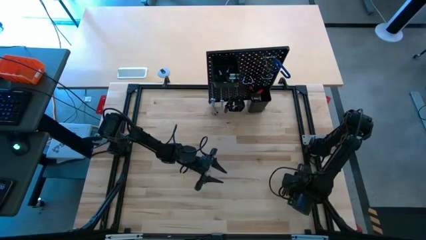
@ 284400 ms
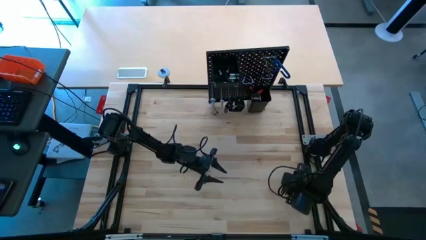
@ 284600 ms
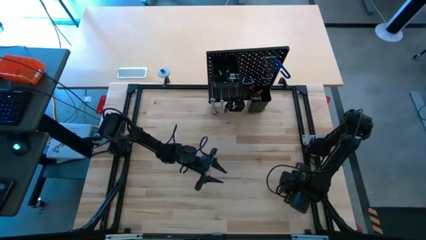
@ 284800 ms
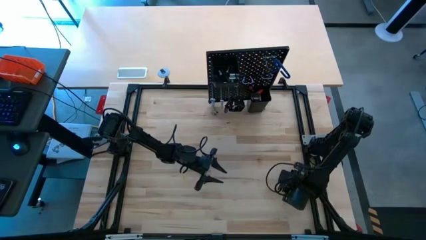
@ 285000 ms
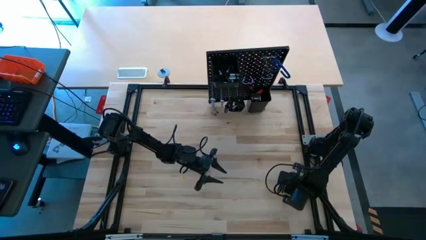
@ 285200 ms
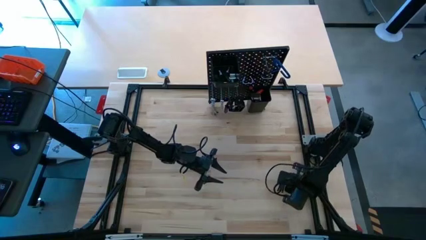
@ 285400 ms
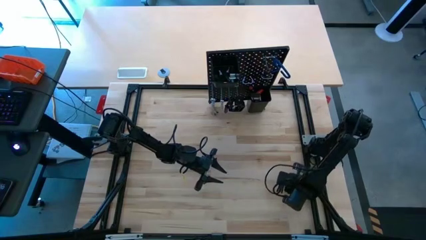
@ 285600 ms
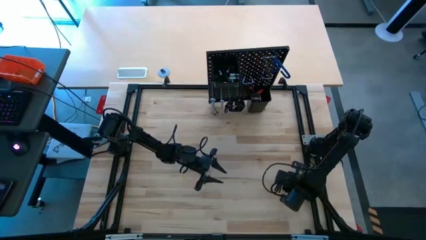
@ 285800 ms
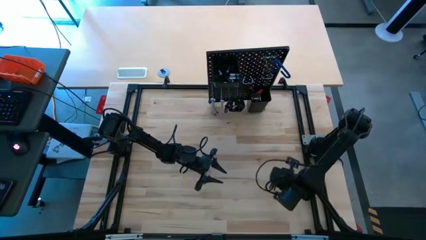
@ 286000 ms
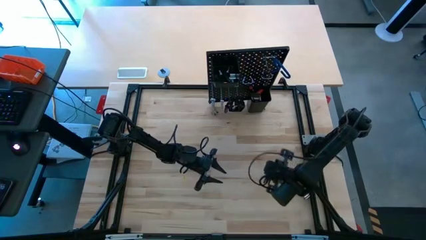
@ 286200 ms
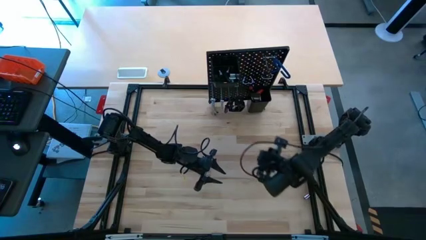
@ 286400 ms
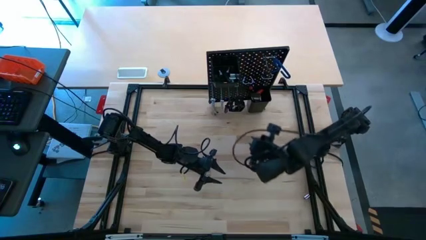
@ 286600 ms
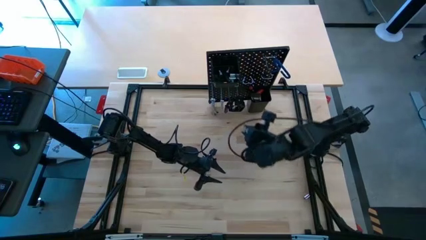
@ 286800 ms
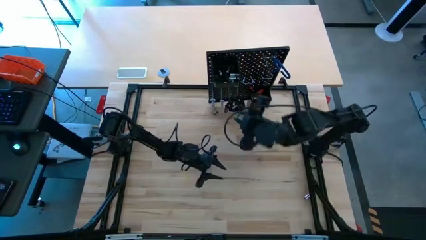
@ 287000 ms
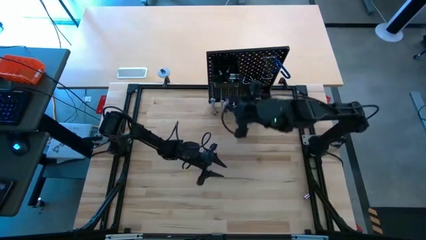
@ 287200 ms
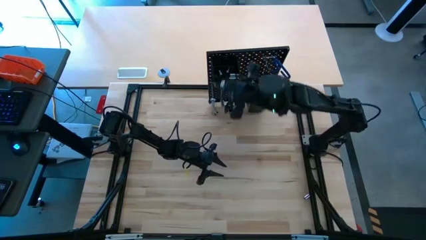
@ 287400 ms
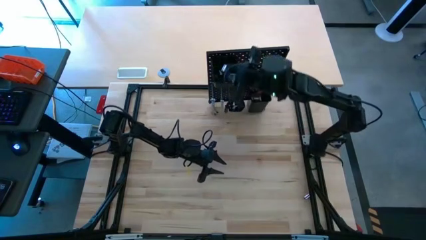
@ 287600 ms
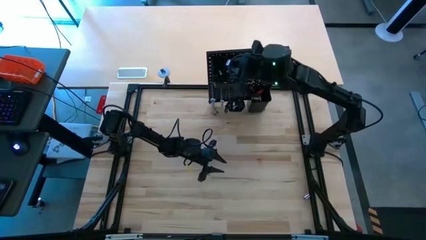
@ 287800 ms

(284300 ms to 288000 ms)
Task: Hang tools onto peg board
Put the silver socket into the top black bin on the peg board

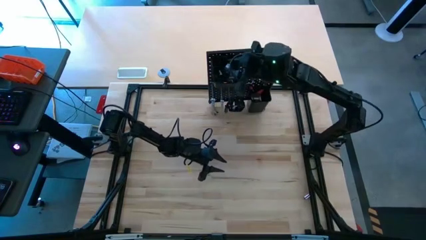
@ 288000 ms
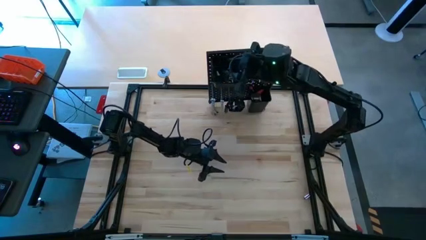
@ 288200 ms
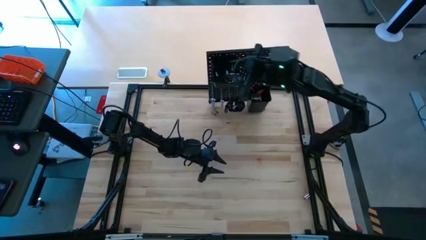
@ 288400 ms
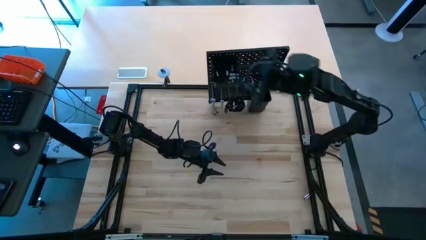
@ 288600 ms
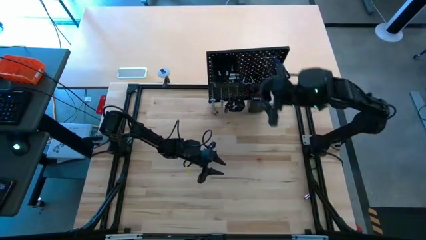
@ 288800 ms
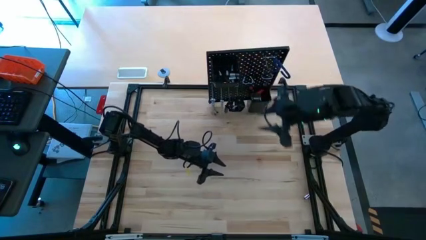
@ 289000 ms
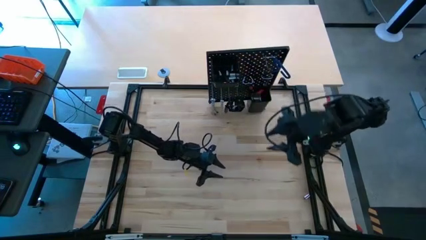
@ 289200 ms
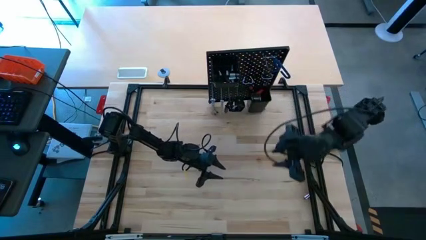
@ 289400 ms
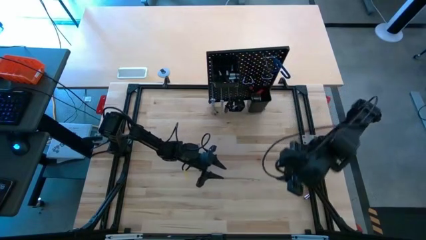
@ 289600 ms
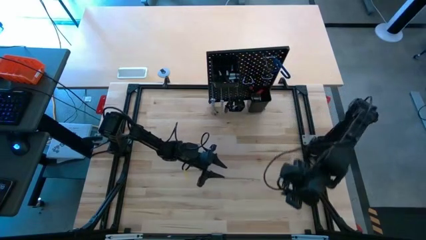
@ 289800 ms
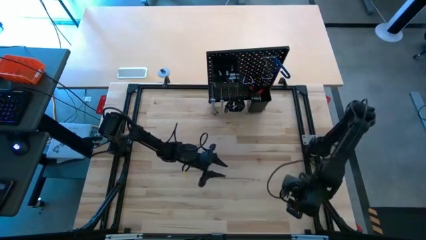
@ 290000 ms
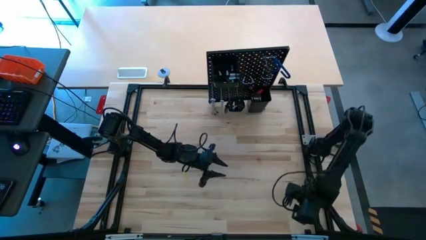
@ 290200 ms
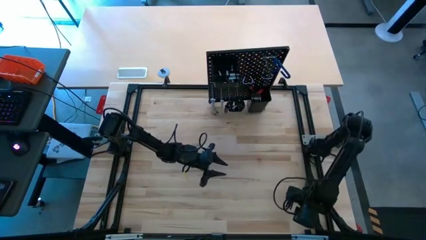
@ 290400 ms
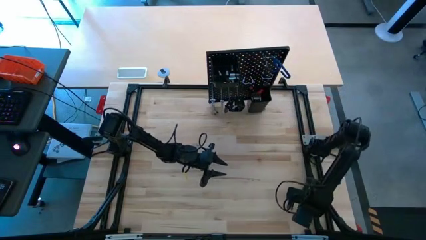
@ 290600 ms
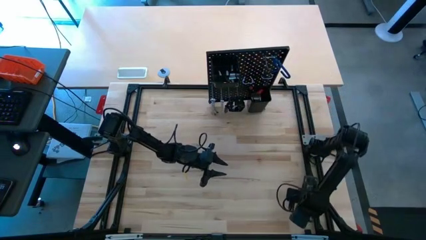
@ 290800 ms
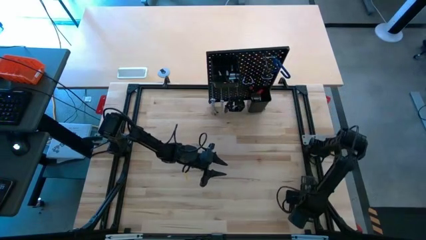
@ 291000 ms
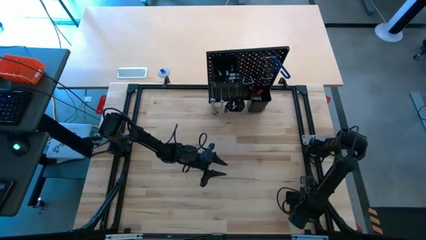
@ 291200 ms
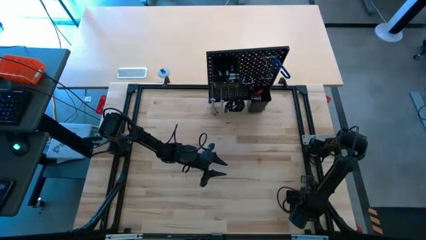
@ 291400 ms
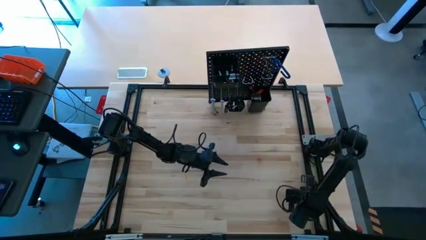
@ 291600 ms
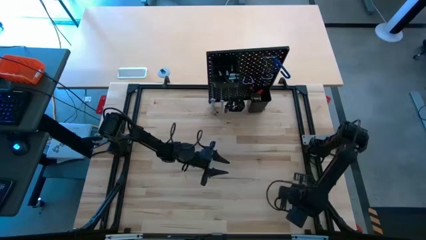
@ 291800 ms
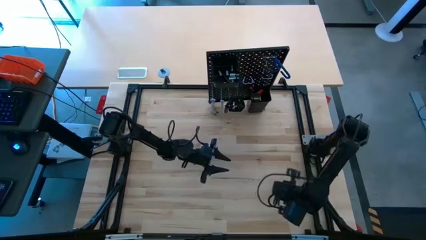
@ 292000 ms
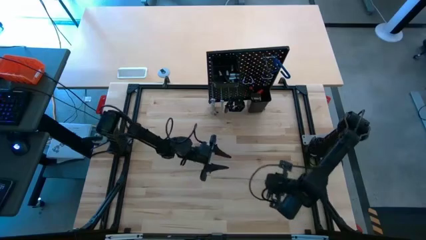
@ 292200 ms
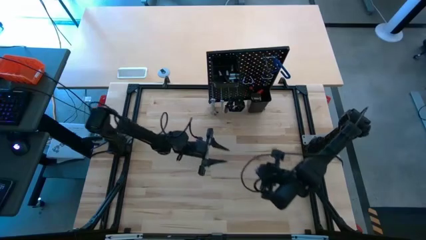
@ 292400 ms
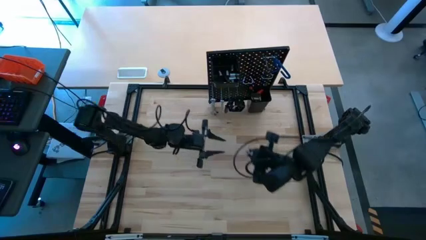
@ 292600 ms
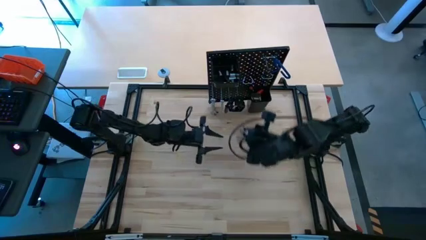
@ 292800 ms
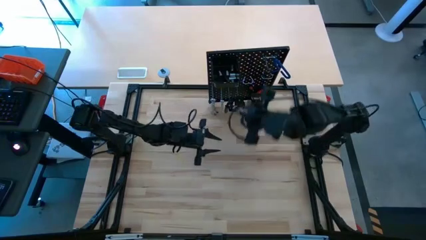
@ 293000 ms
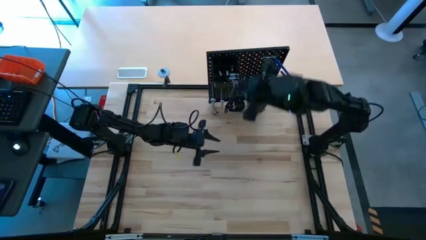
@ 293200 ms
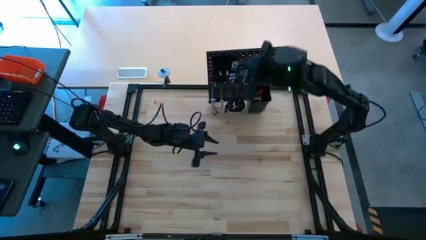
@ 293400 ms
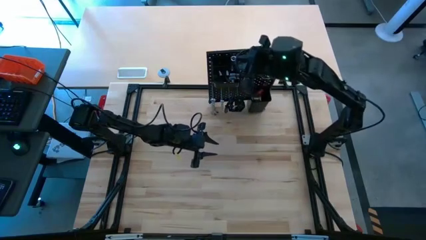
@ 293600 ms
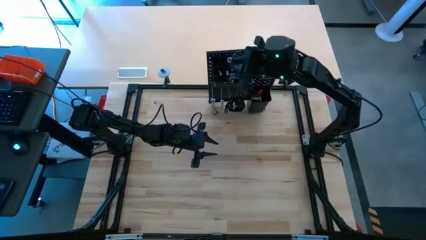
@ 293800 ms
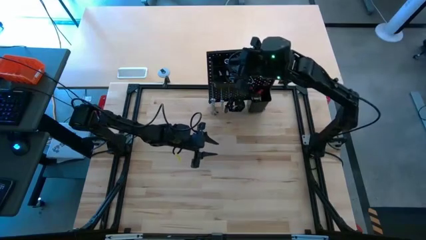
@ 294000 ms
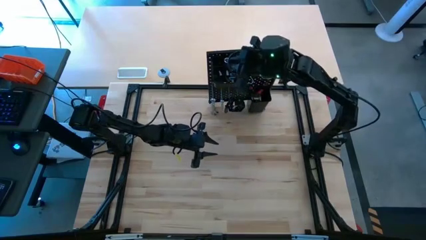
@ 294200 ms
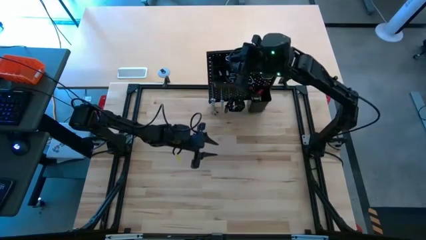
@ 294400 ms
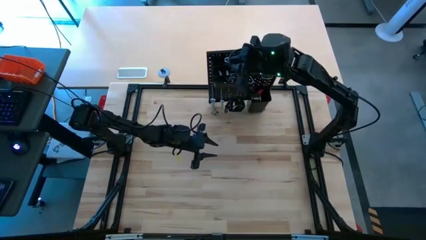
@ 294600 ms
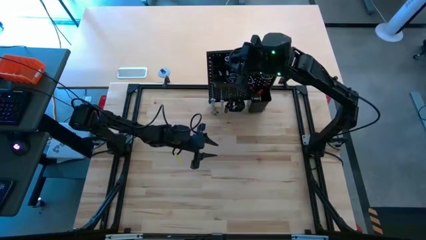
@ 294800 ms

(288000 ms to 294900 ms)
Put the silver socket into the top black bin on the peg board

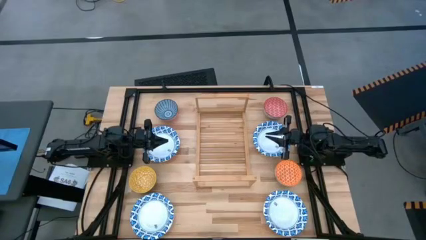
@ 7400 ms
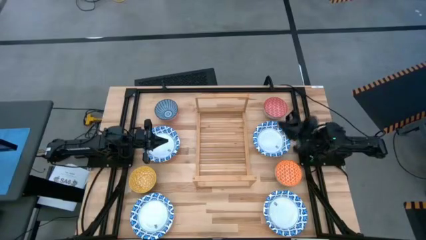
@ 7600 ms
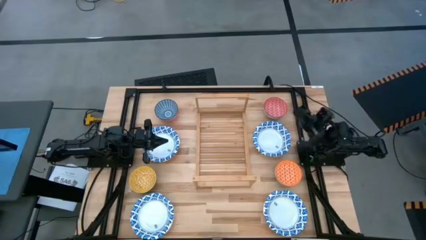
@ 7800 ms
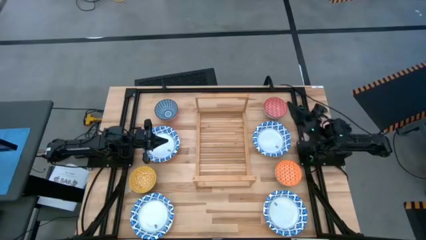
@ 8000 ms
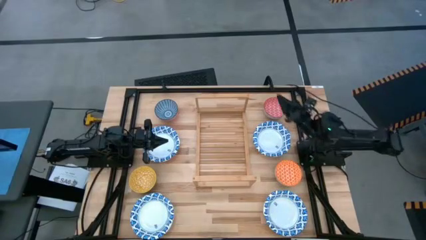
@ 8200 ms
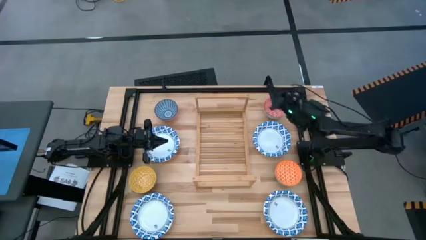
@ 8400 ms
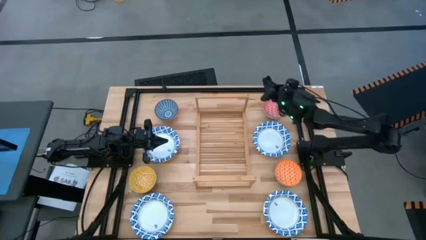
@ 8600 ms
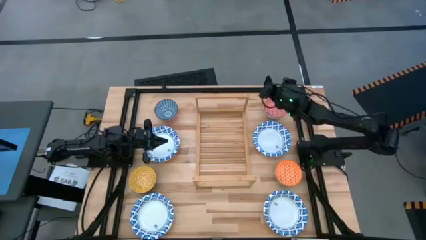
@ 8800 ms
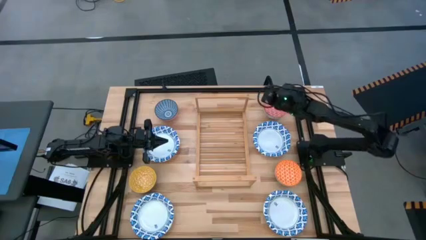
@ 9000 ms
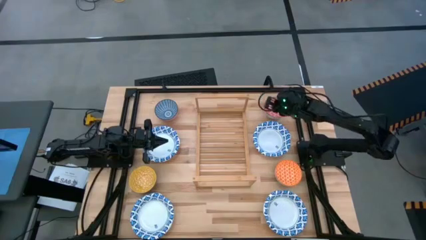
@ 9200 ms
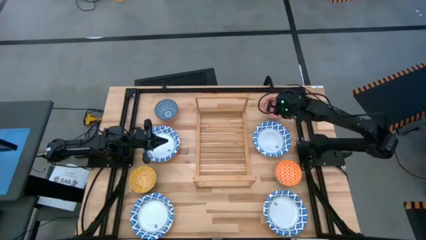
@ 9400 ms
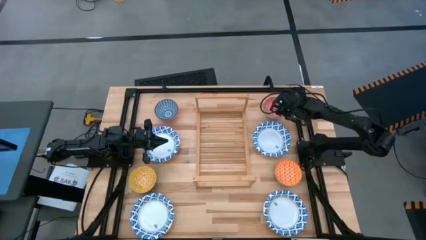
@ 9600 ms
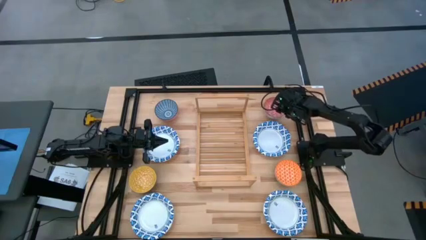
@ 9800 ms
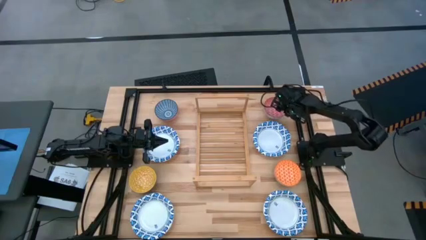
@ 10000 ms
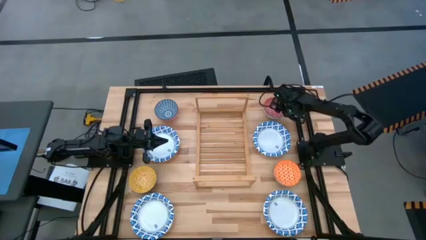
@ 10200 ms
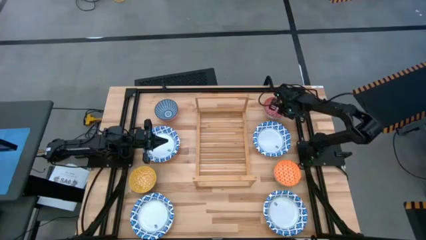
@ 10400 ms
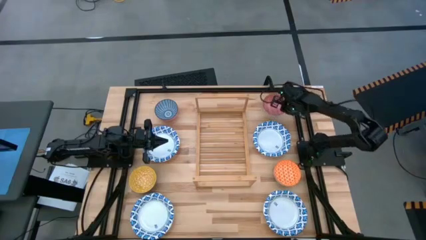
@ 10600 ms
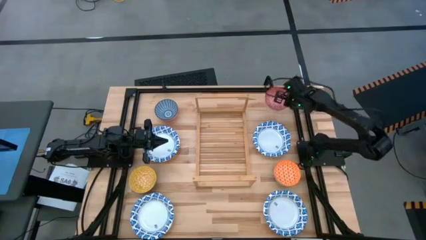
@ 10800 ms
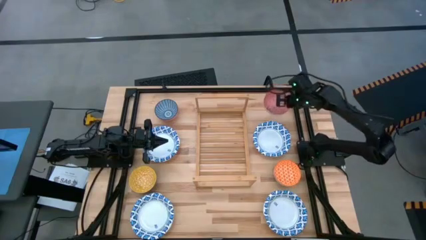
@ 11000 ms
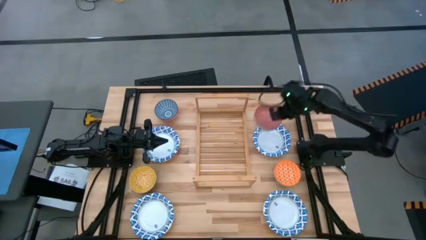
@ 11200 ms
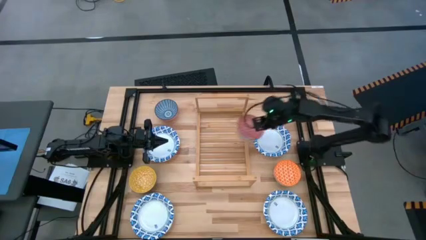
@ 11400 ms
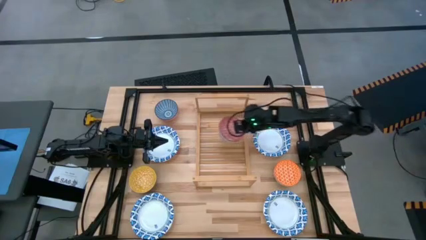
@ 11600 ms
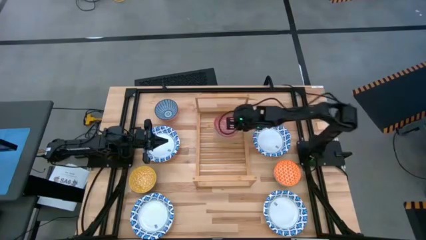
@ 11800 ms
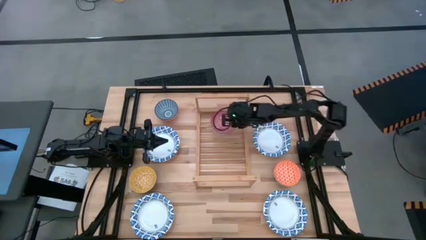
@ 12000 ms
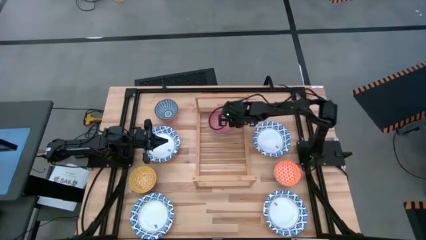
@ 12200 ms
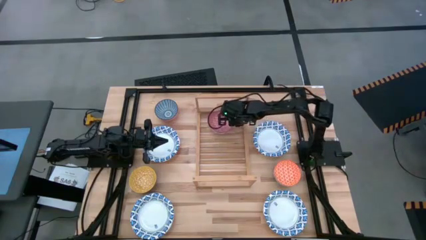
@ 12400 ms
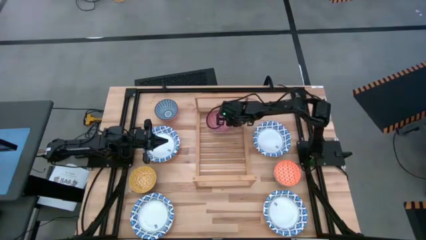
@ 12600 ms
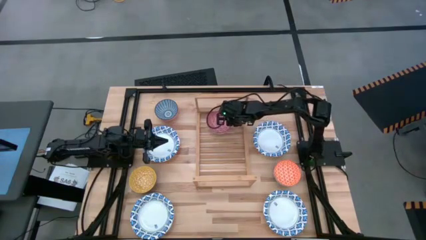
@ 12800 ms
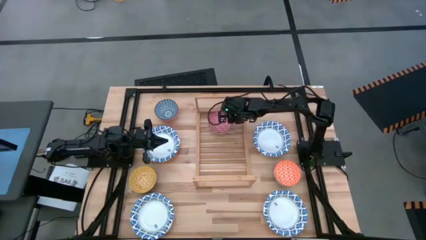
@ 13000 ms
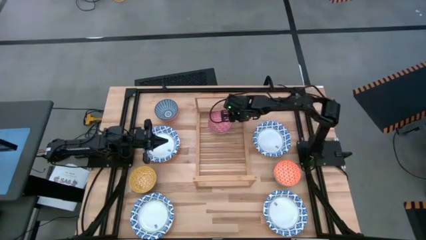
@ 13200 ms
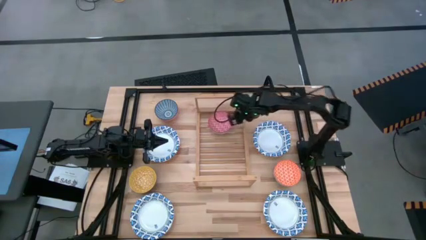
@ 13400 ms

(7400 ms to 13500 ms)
Task: Place and stack bowls onto a shelf
Put the red bowl on the shelf
